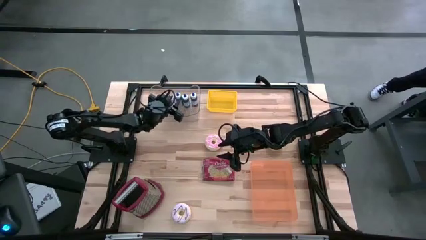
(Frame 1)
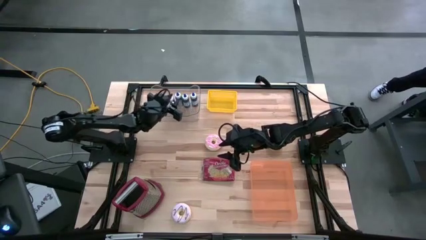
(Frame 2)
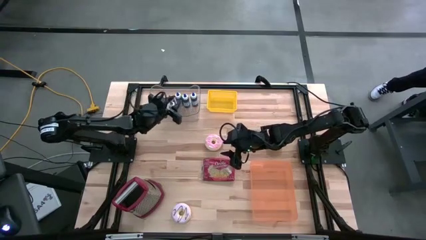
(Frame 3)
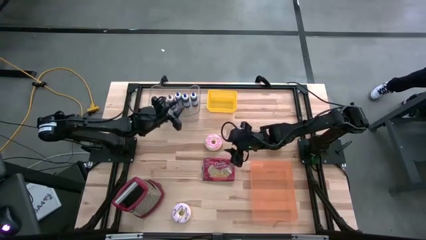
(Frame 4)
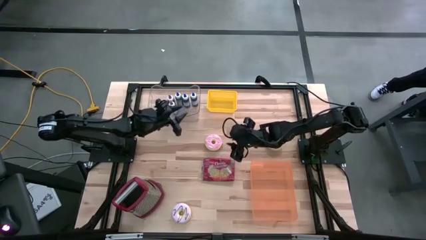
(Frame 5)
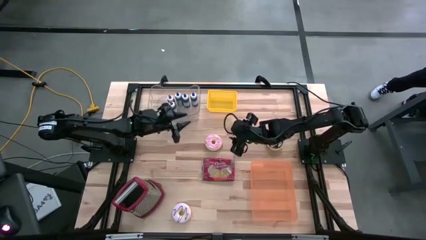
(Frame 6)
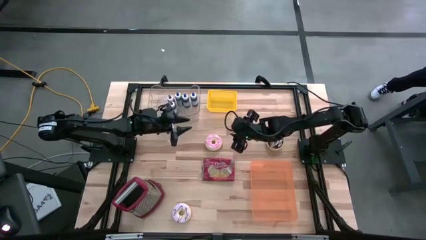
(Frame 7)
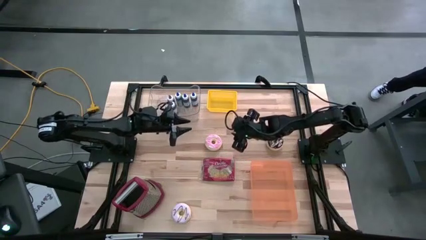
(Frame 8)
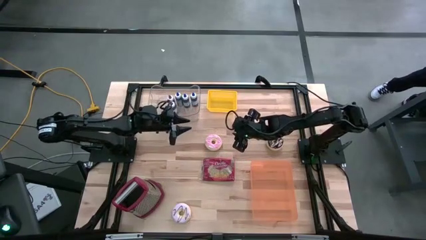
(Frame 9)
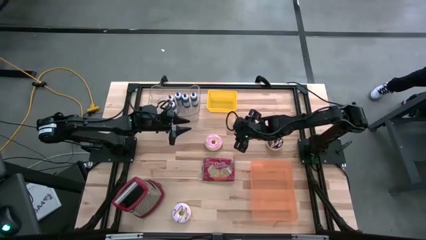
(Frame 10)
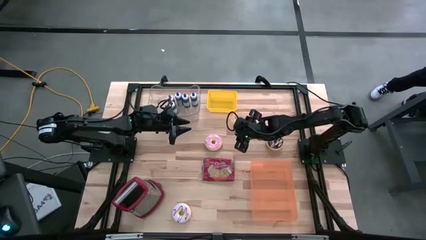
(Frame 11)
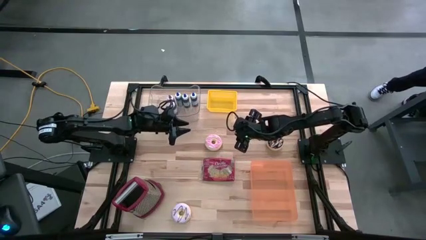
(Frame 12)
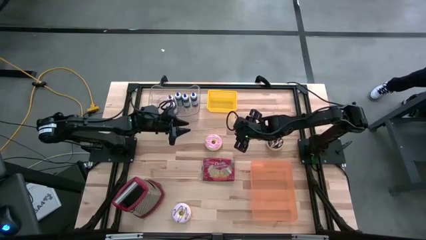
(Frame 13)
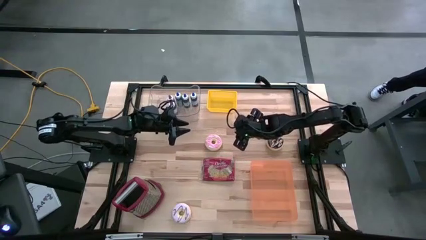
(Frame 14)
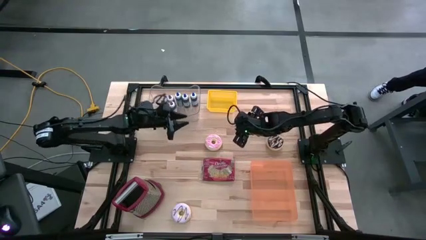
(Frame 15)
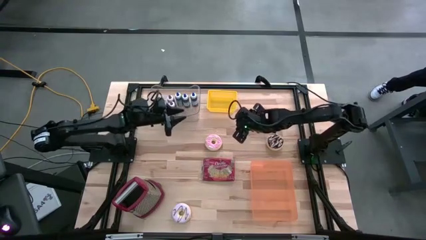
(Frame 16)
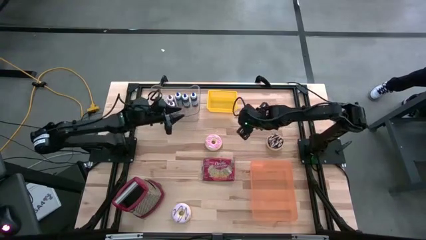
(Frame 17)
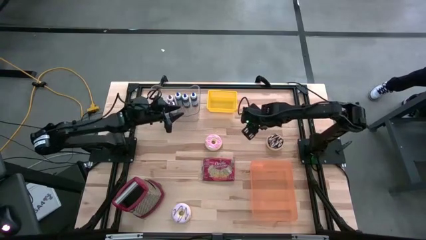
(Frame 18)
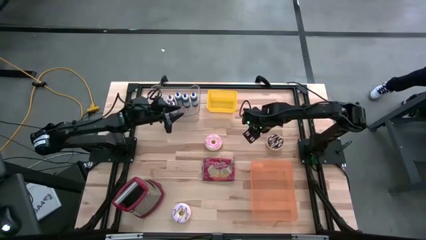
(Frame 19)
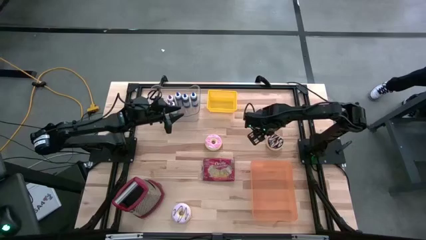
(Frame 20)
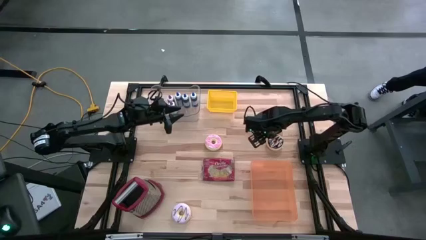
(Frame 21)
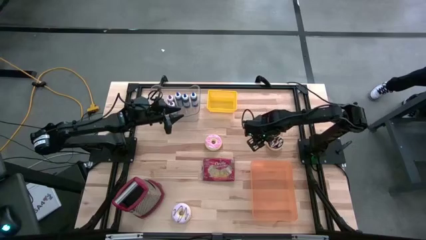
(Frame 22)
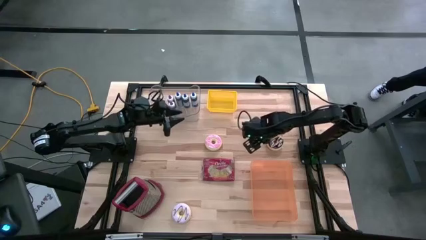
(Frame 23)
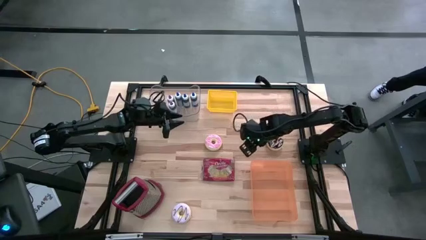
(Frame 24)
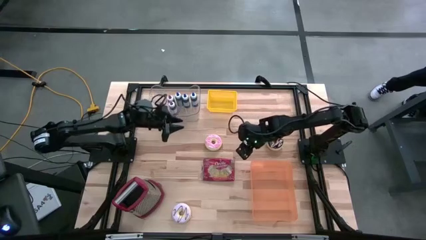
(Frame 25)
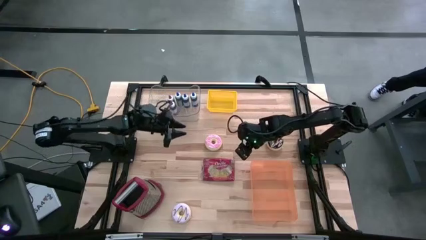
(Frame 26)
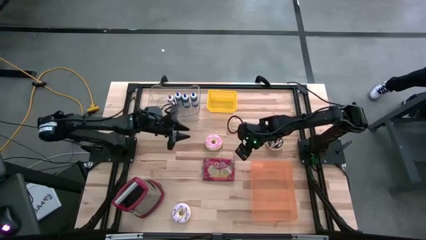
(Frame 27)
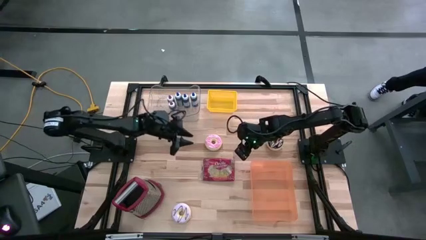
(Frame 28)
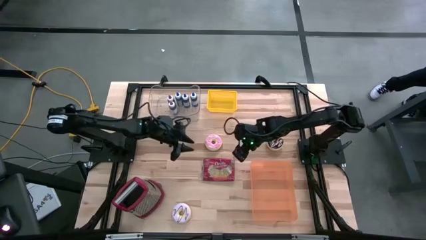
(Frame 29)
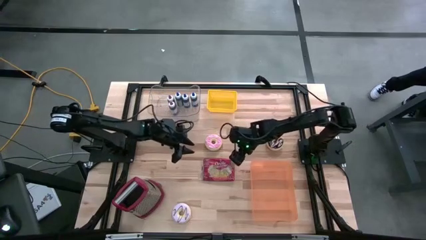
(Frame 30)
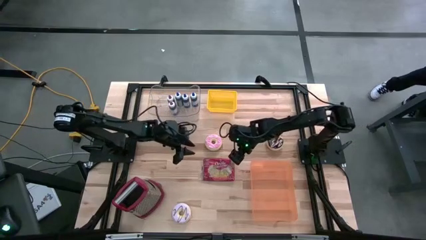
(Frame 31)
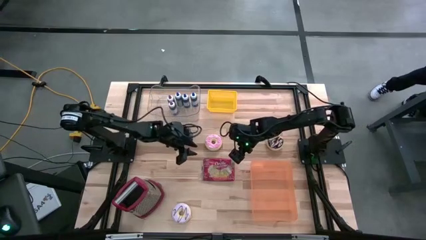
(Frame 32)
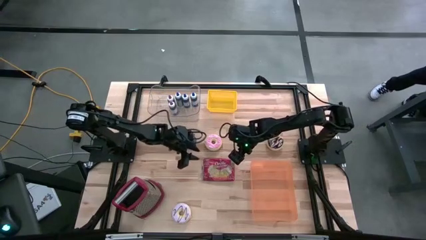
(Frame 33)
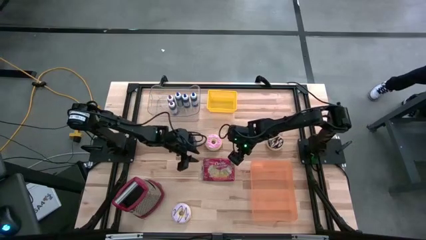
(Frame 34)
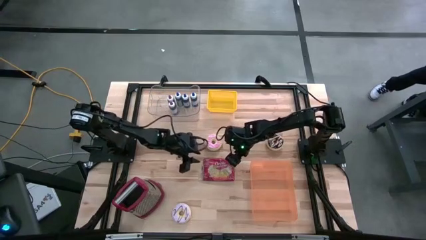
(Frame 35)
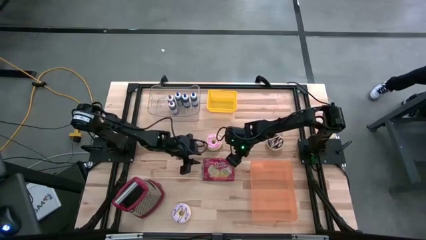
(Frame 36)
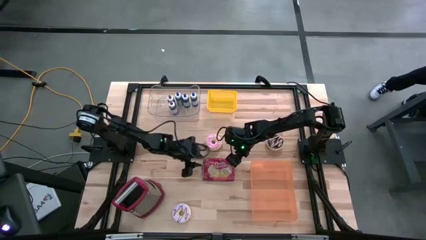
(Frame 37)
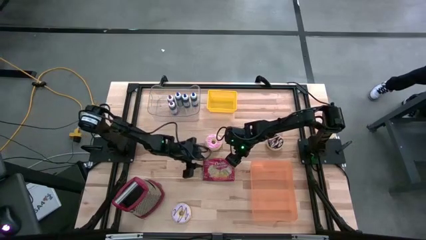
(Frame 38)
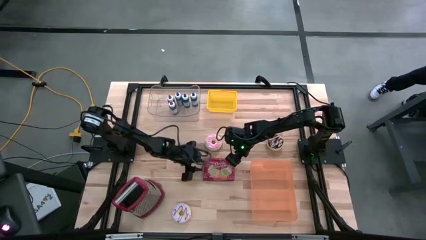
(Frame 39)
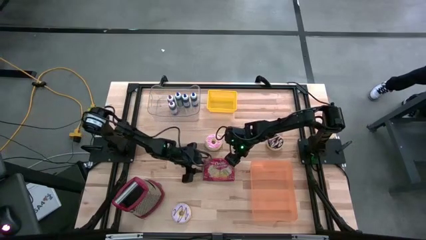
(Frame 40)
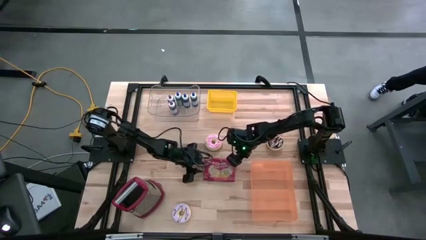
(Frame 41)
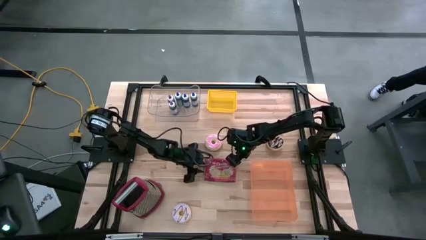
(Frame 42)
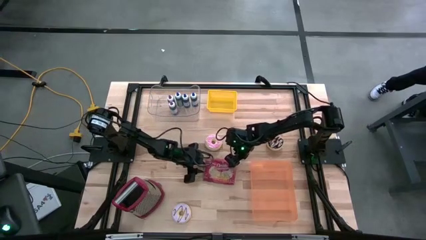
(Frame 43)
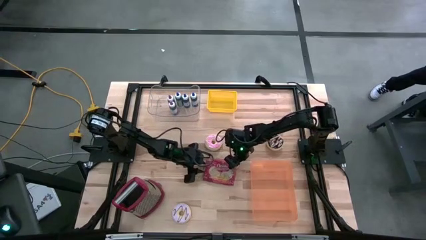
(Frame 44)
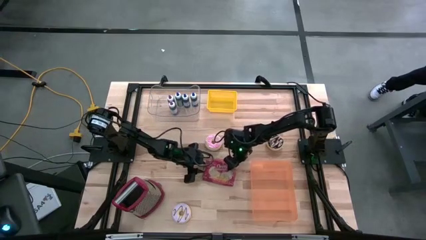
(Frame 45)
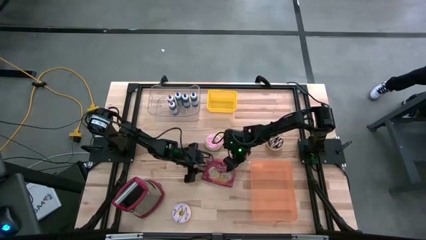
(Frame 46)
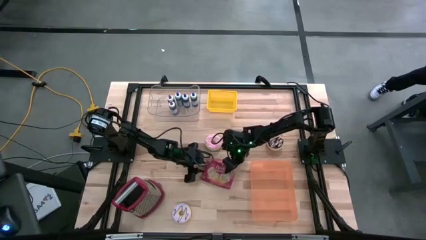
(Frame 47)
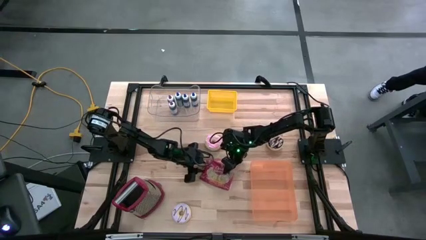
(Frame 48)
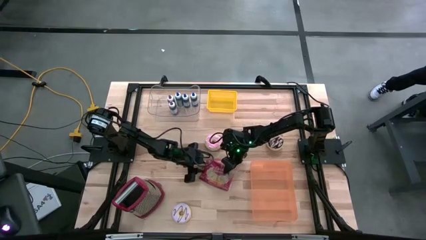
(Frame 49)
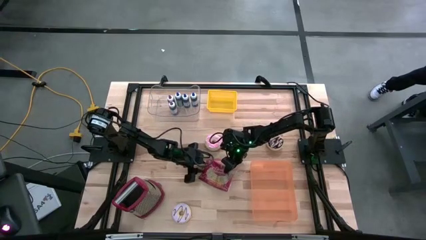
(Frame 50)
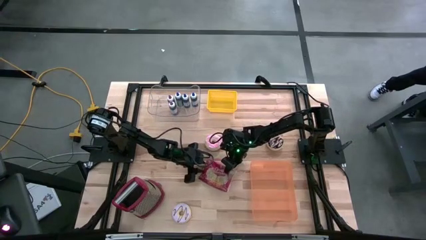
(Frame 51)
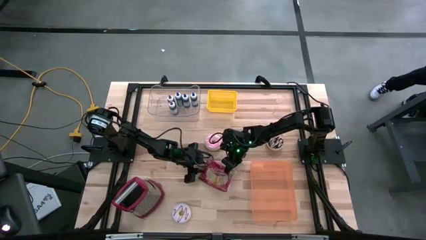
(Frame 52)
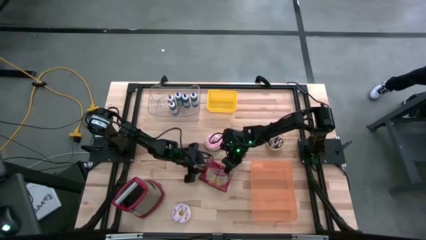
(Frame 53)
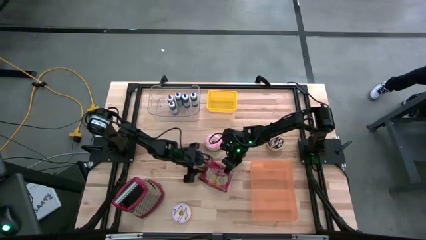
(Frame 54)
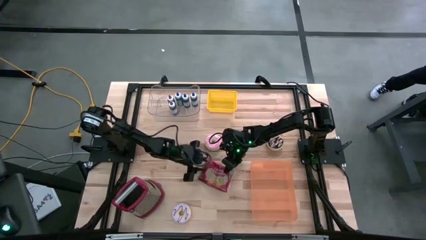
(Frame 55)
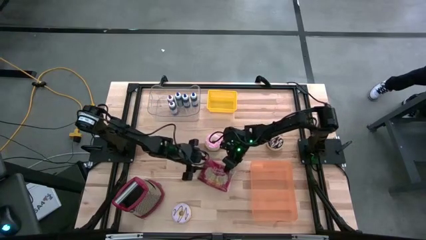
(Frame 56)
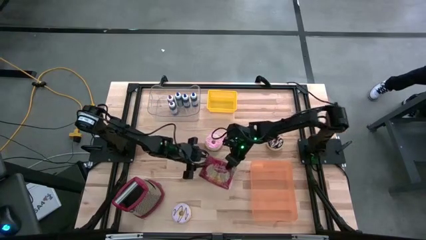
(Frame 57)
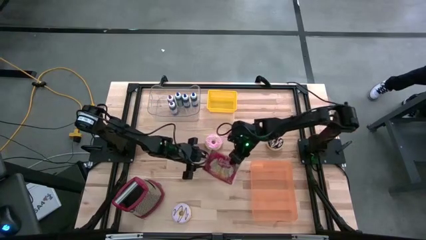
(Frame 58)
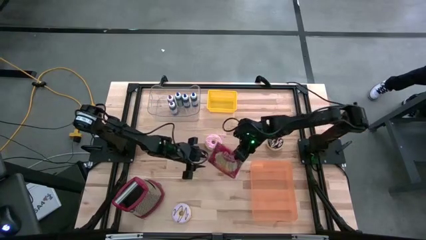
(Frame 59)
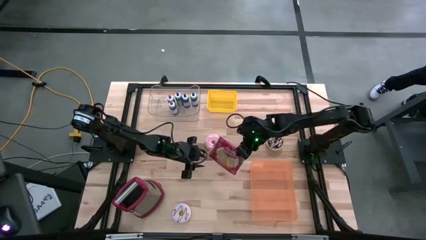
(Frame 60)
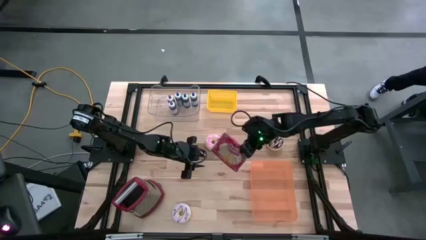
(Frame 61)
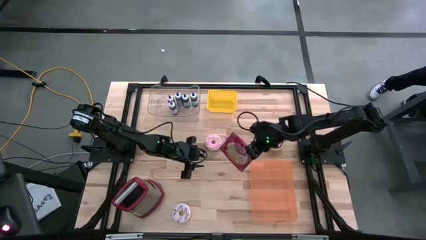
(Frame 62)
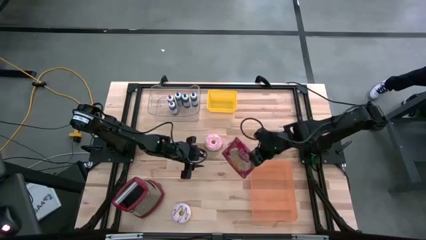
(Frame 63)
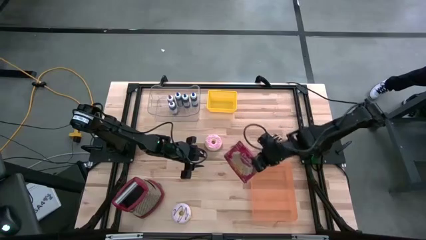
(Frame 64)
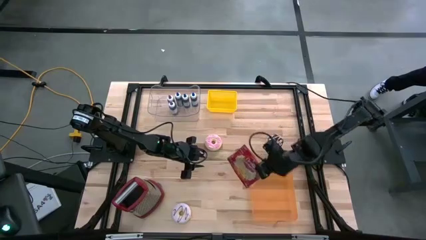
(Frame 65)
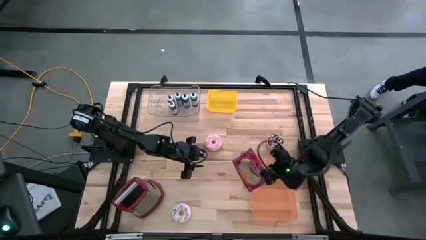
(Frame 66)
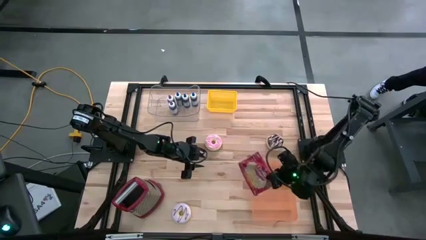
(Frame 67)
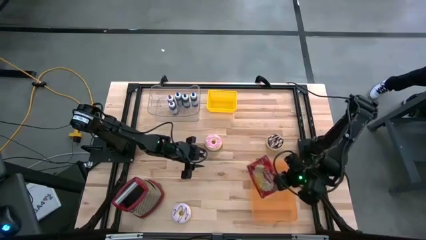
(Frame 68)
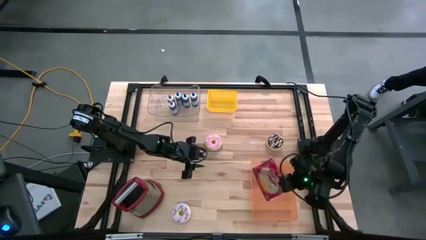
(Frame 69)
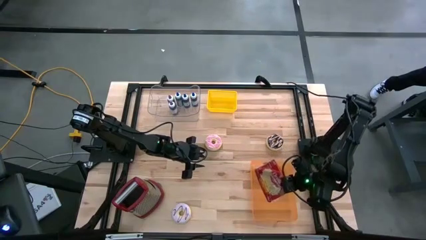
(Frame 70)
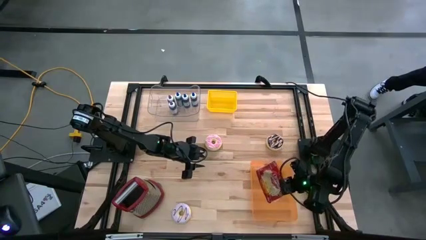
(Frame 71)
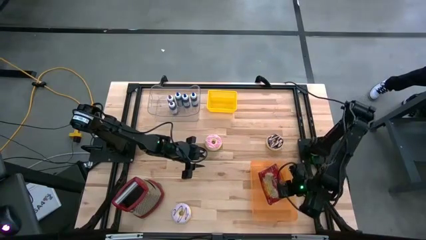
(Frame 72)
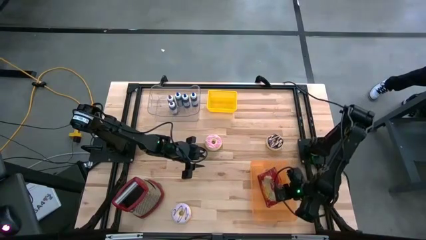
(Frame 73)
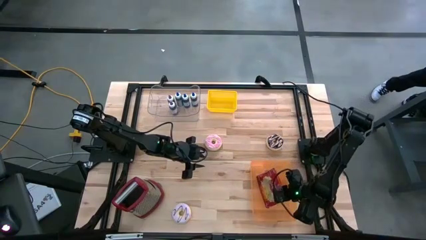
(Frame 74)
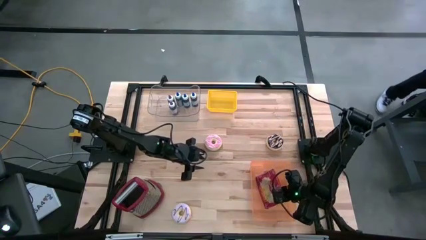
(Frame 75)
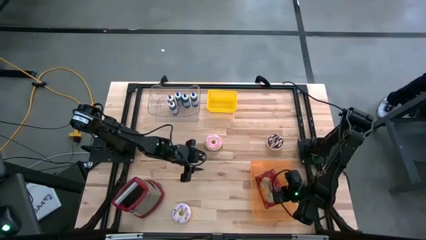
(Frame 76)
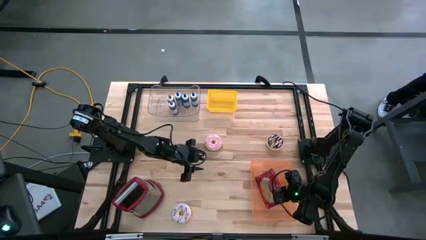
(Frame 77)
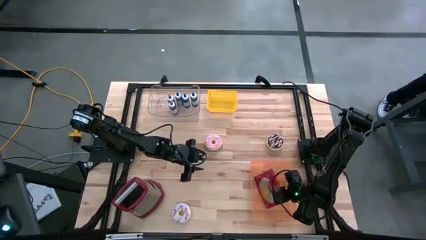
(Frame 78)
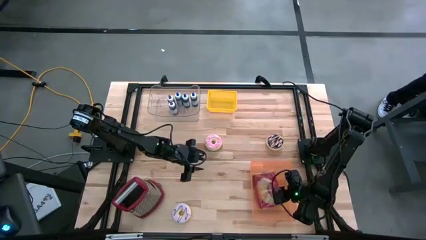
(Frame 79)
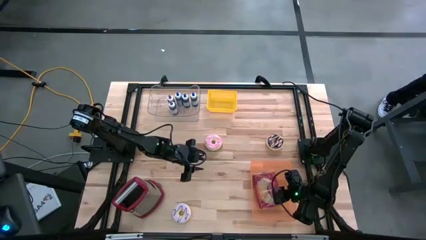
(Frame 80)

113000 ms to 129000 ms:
Put the red popcorn bag into the orange bin

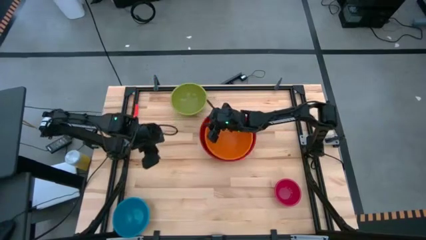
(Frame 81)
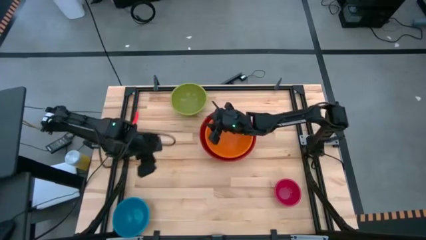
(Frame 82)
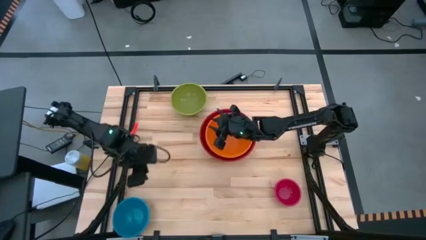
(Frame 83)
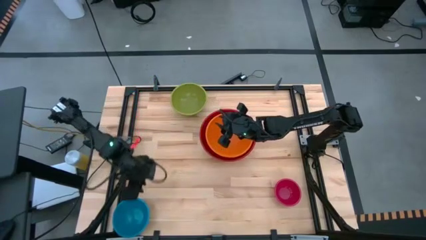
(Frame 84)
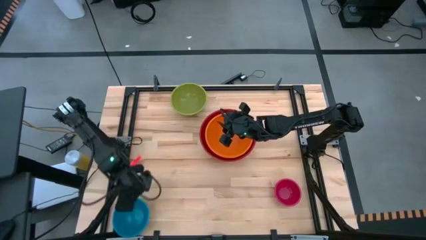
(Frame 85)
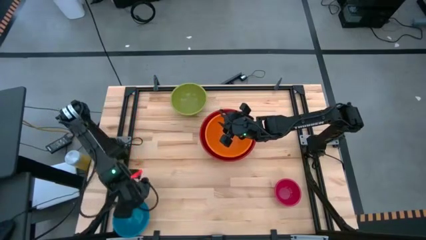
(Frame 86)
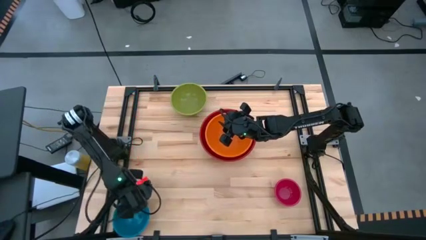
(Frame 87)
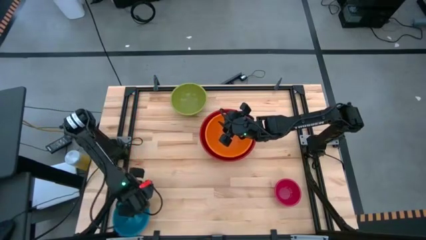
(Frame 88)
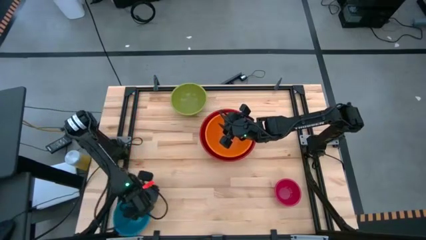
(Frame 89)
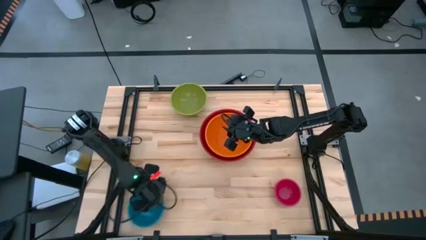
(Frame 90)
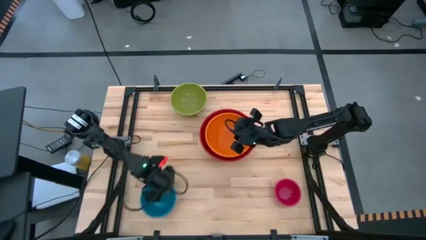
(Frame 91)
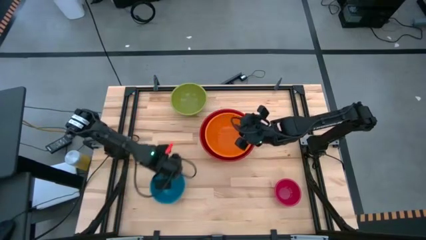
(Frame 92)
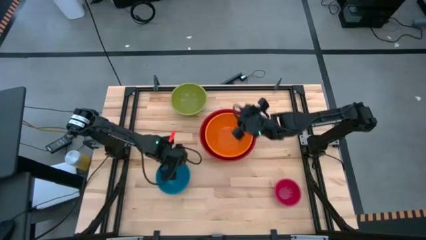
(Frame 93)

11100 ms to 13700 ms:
Stack the blue bowl on top of the orange bowl
